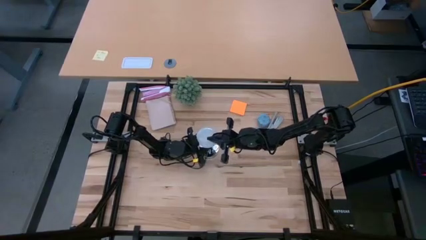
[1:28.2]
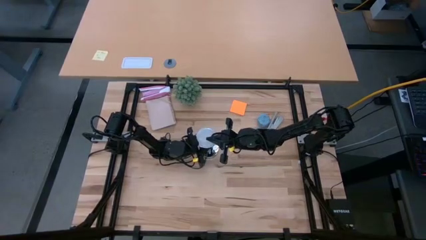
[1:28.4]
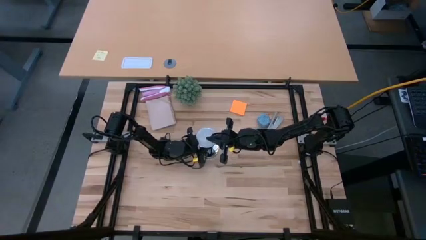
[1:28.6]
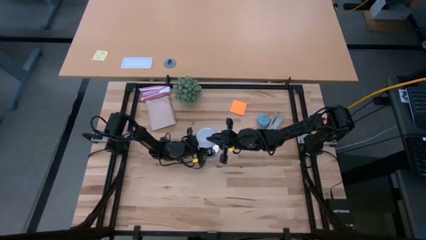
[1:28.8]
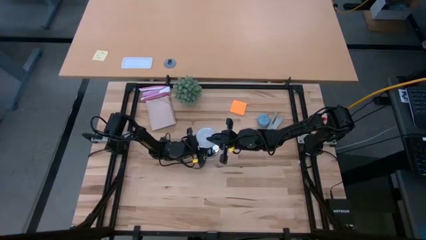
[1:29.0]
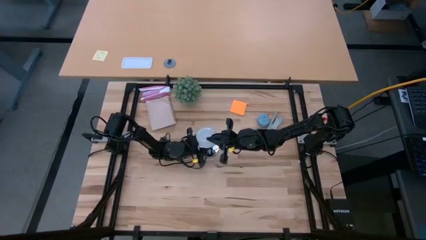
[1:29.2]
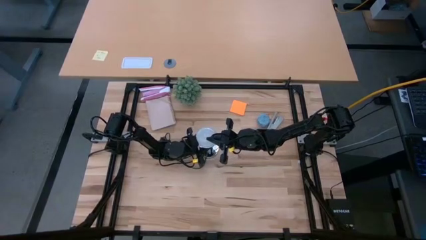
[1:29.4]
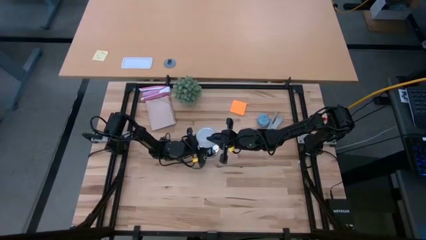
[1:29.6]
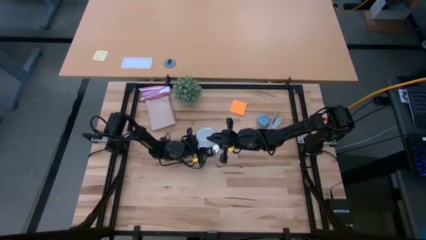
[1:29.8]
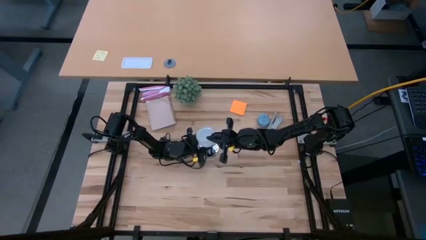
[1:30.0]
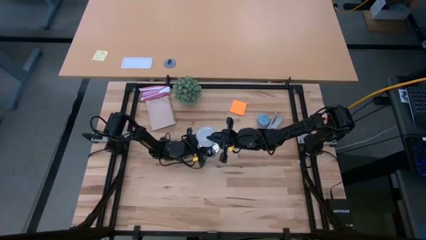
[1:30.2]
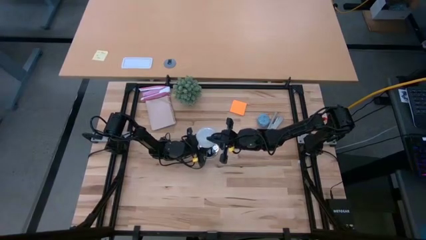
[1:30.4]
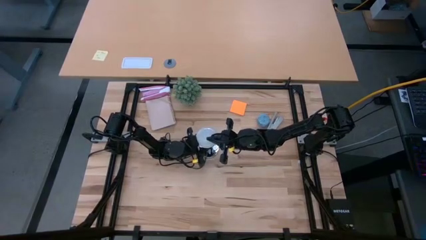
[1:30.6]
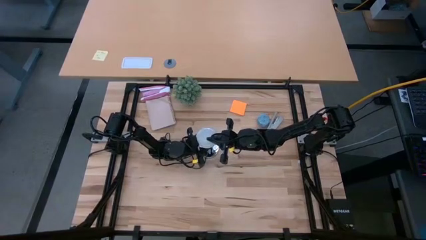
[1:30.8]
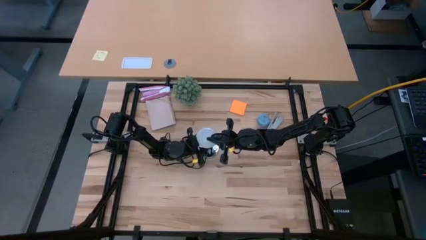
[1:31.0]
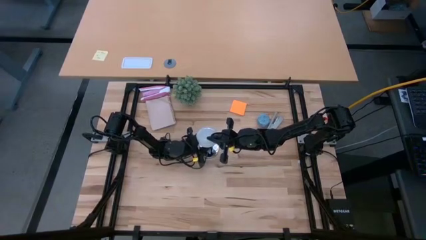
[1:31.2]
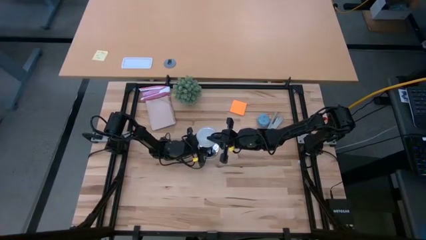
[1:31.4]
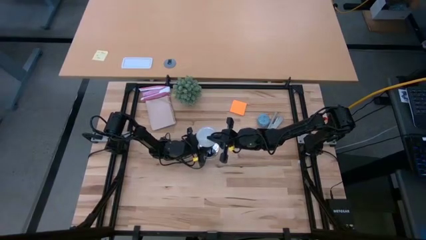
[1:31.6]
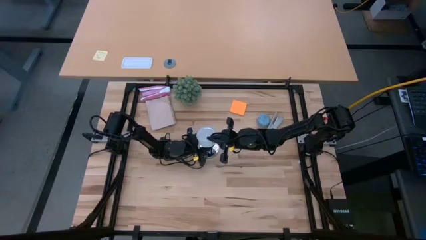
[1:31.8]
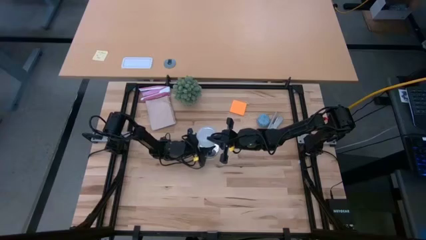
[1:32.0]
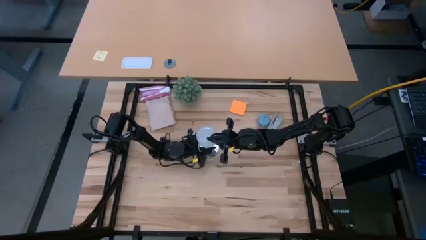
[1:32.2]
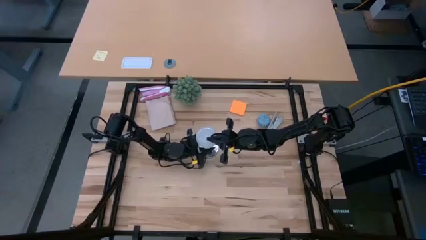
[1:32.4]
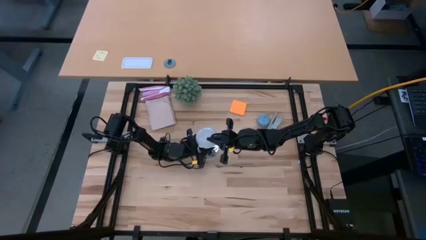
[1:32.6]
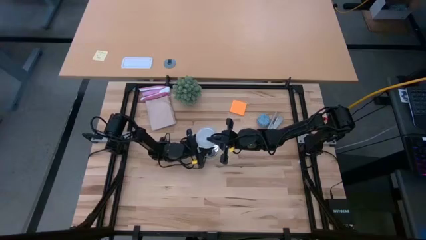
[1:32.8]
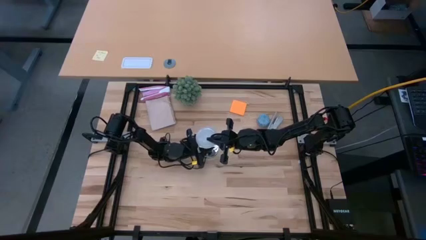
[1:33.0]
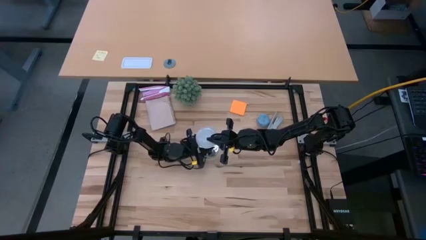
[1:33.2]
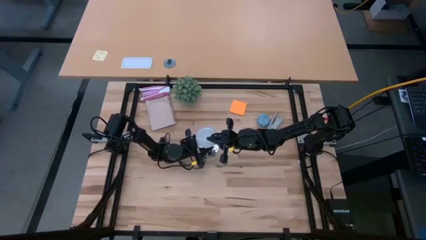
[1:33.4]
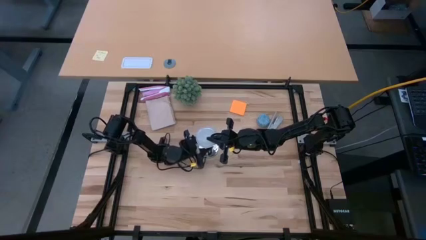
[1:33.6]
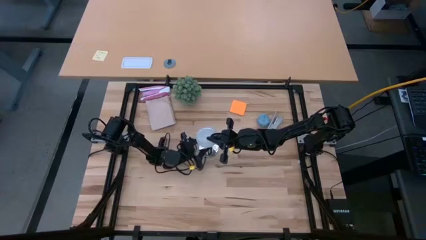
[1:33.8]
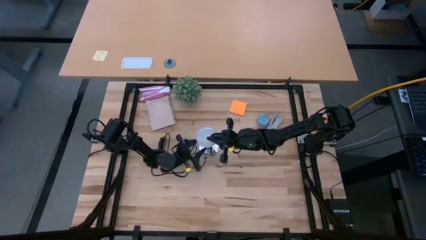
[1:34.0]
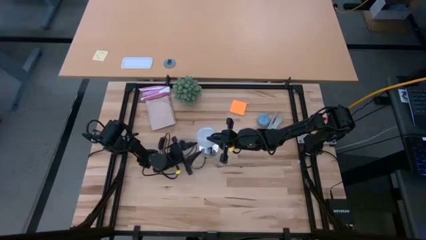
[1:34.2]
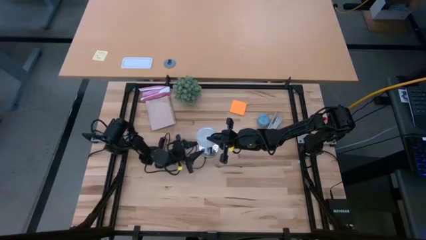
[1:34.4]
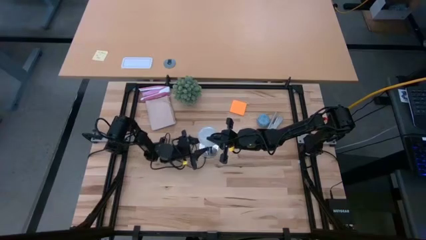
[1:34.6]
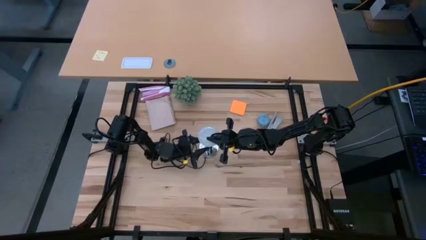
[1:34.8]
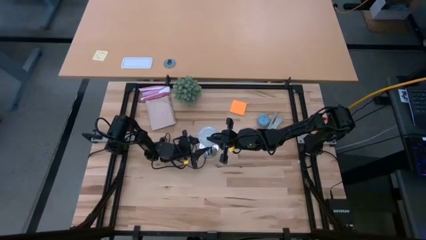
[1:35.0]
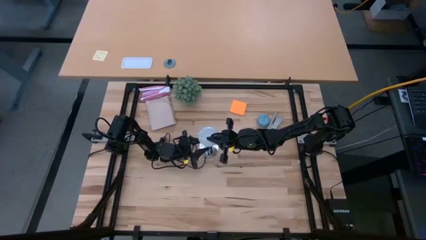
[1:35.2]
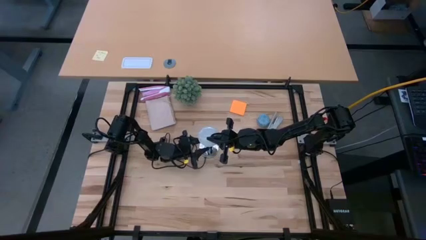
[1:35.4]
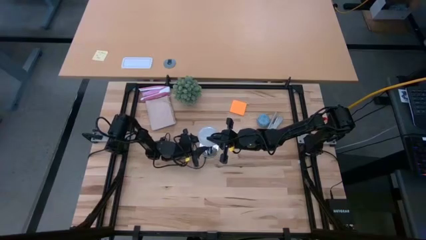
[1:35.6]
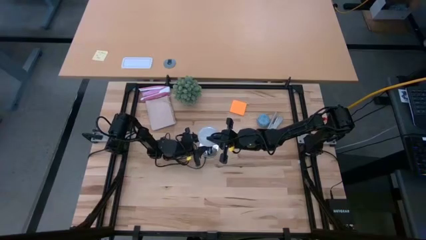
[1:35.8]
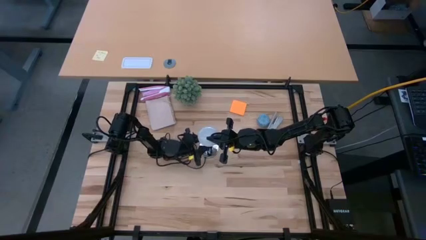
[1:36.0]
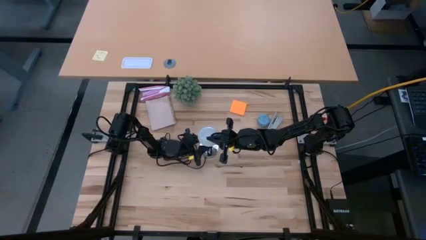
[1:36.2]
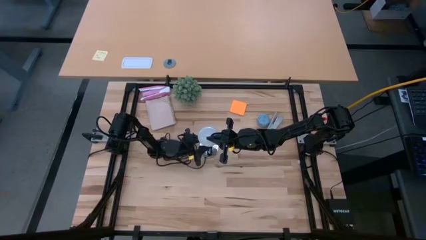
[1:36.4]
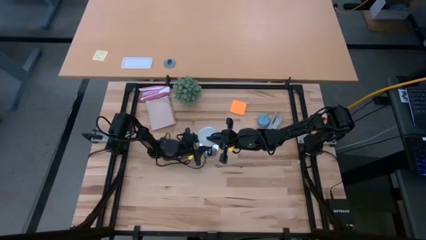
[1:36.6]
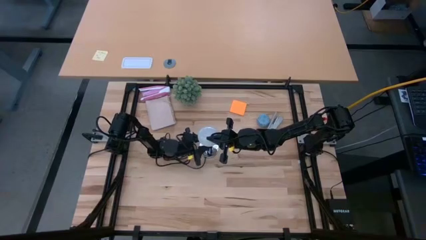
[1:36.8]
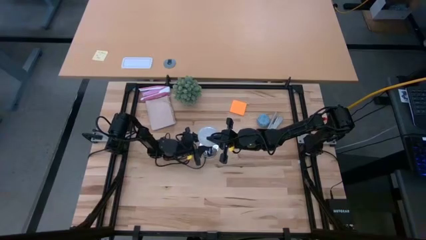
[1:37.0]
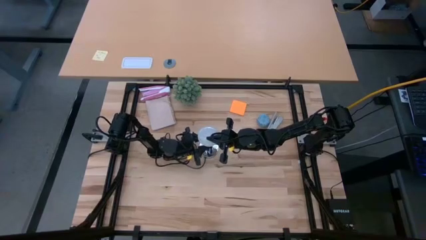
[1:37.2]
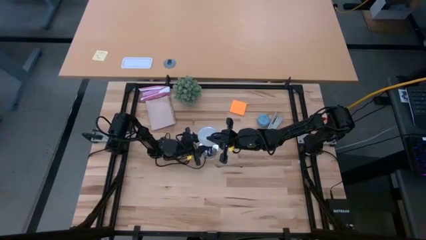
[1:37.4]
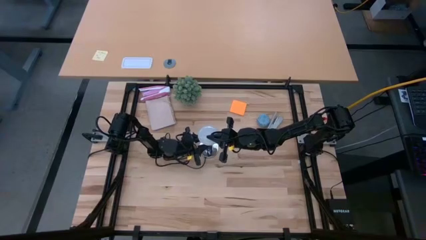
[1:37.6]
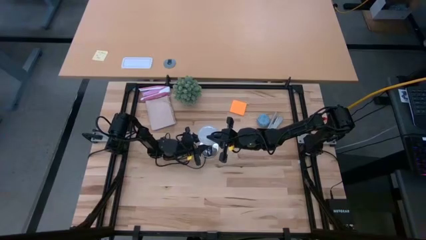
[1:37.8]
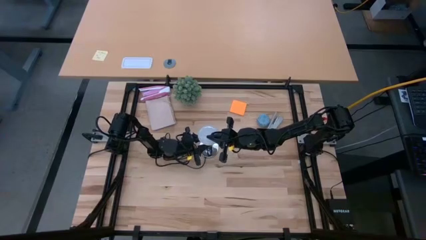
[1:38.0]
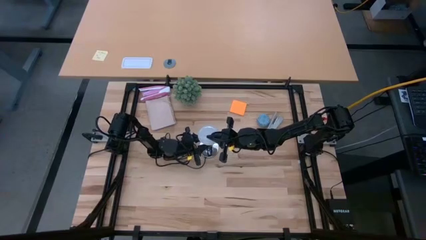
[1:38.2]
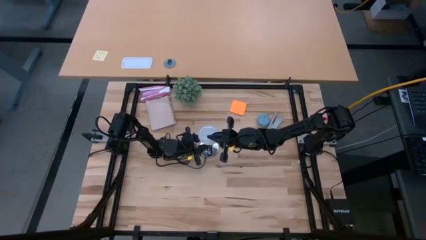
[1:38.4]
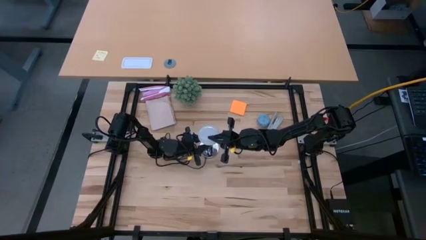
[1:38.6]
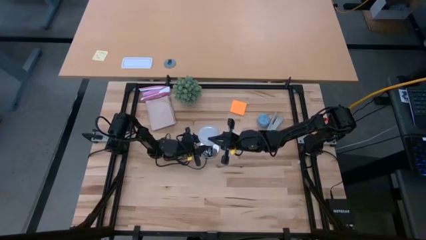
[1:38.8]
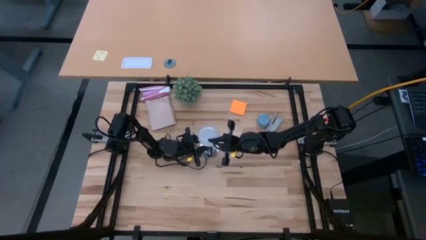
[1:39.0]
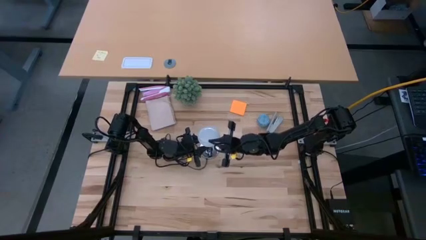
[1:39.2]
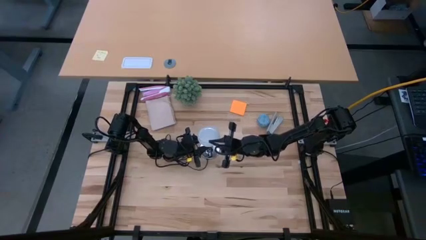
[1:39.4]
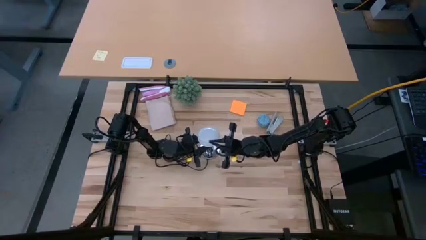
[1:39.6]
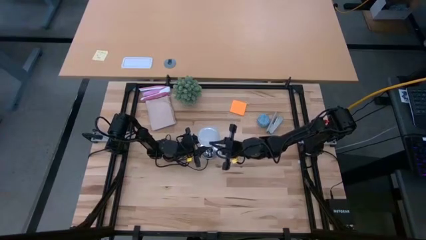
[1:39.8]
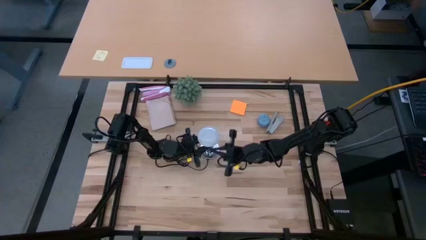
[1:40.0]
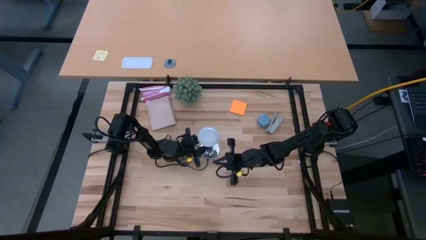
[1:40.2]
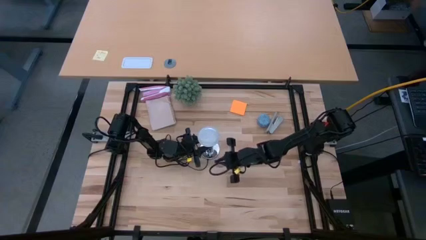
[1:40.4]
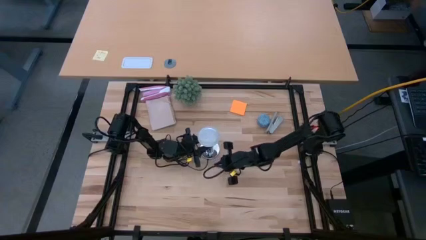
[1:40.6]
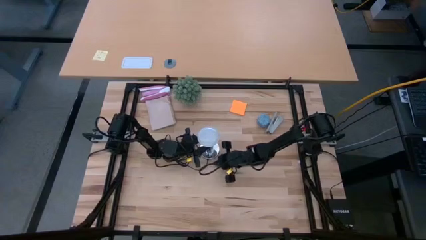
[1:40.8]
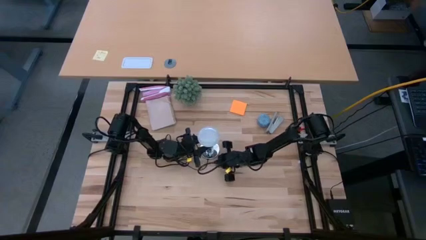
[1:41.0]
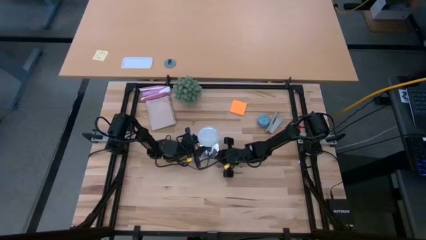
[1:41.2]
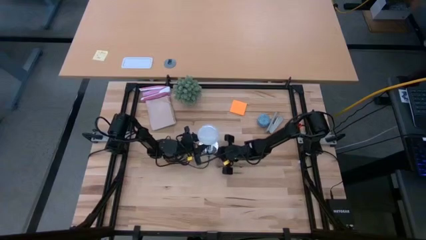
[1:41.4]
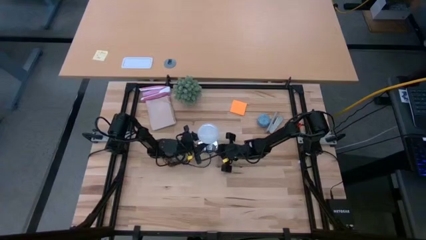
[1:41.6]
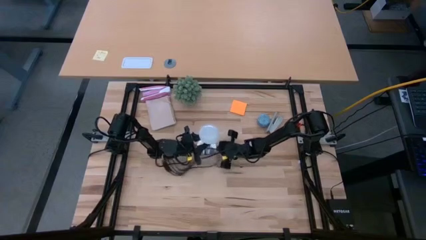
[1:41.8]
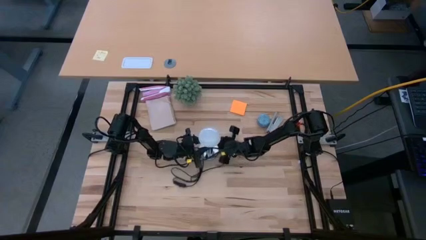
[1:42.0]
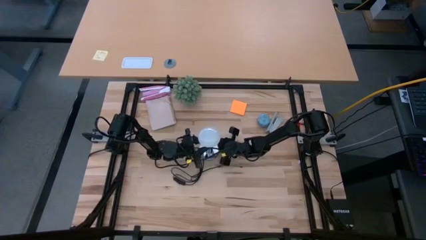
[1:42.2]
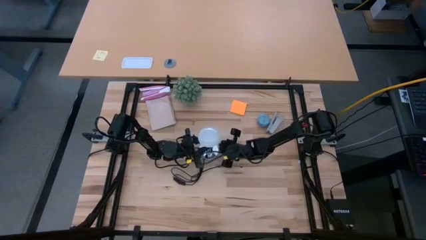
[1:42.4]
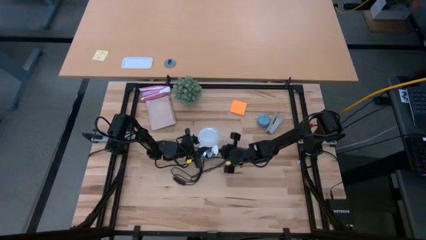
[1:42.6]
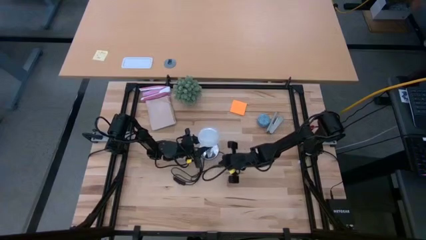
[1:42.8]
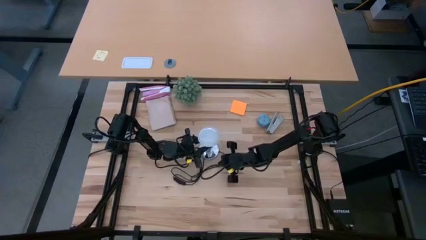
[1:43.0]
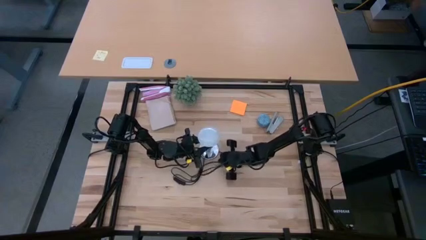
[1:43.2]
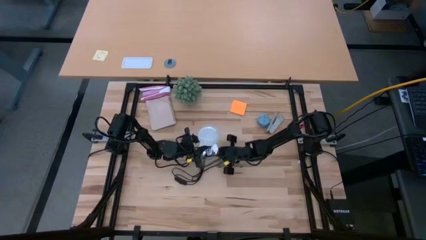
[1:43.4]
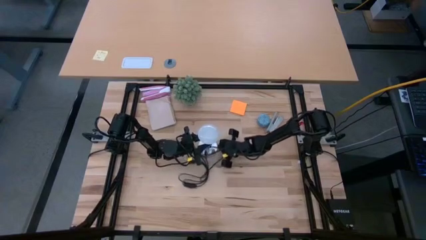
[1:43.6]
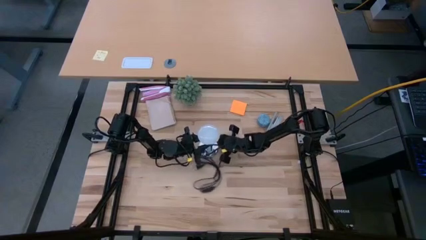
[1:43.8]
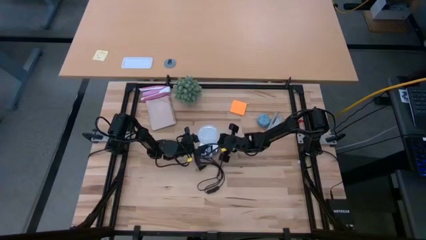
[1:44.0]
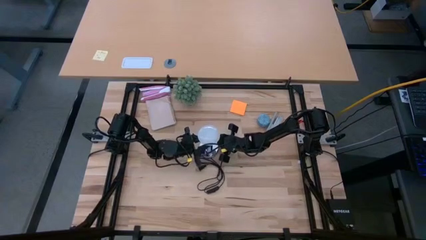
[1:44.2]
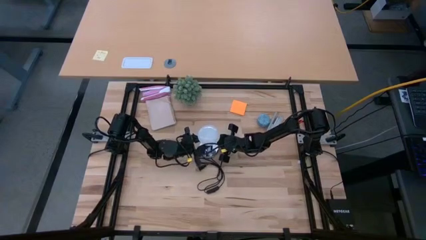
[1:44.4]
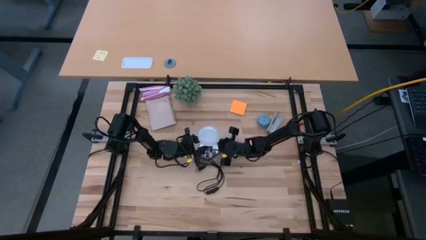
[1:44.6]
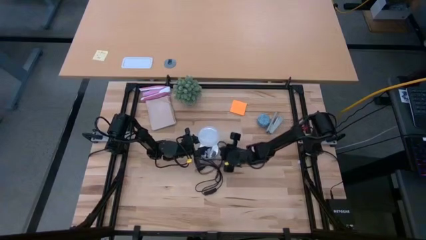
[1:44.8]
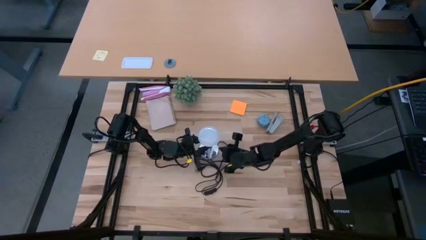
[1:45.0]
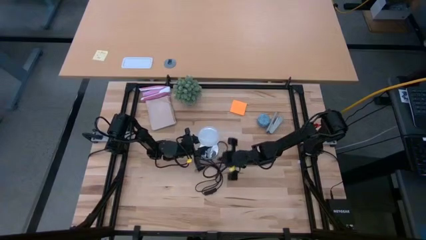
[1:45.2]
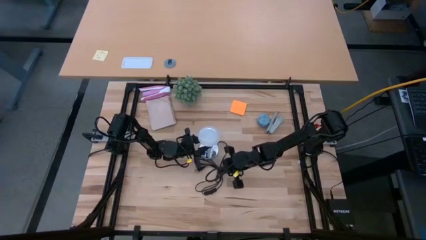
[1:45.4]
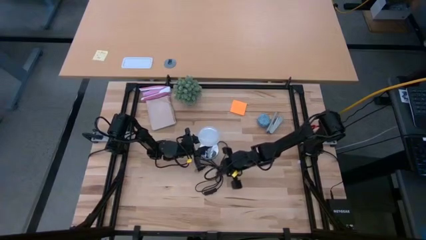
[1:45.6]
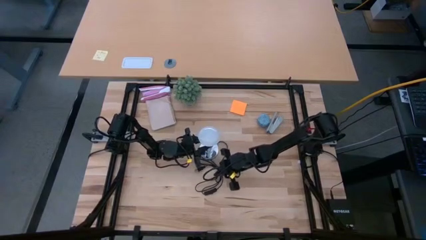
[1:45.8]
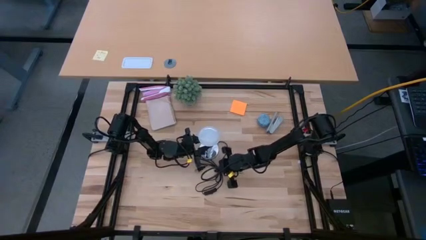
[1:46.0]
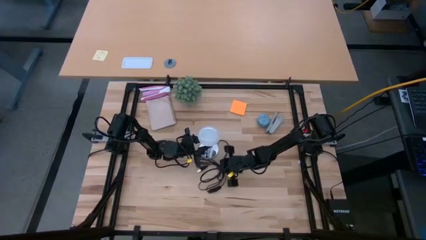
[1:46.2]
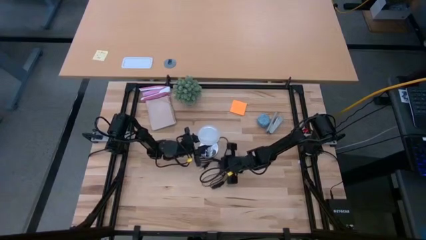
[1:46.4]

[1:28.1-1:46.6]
Task: Screw lightbulb
Insert the white lightbulb into the silver lamp
